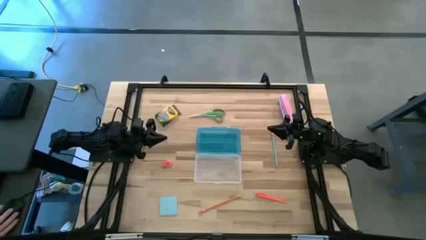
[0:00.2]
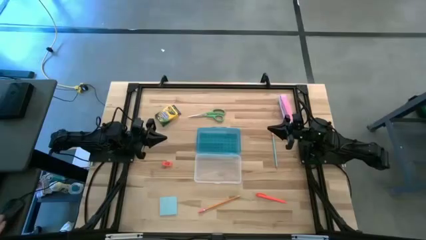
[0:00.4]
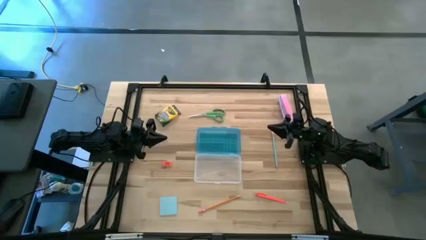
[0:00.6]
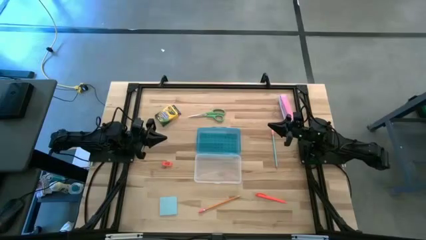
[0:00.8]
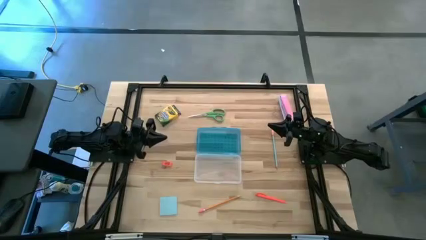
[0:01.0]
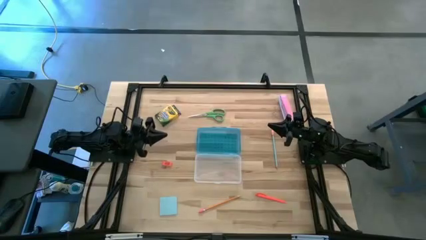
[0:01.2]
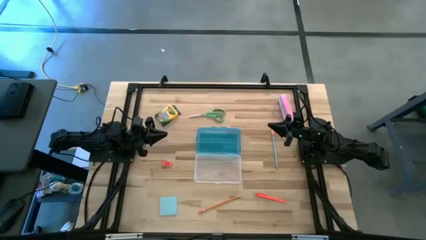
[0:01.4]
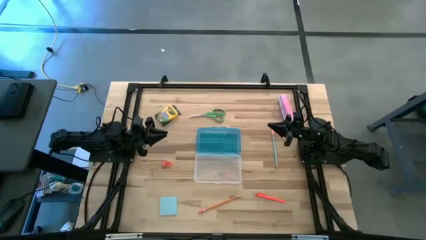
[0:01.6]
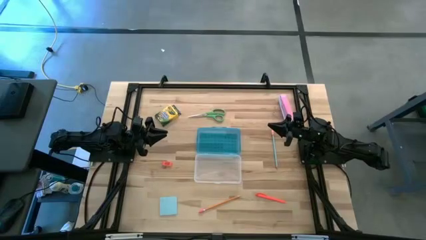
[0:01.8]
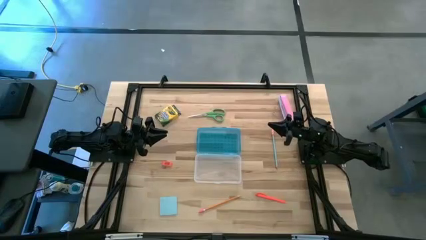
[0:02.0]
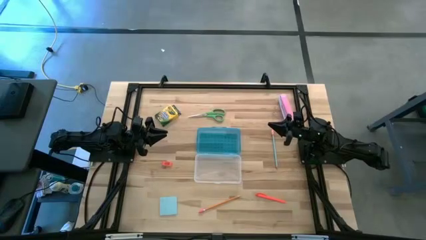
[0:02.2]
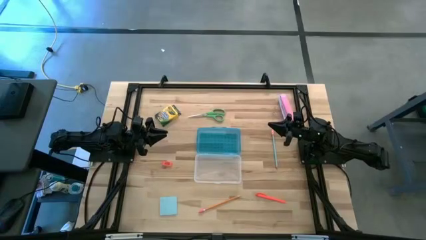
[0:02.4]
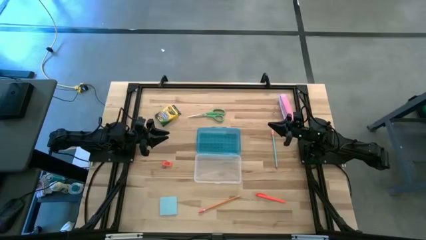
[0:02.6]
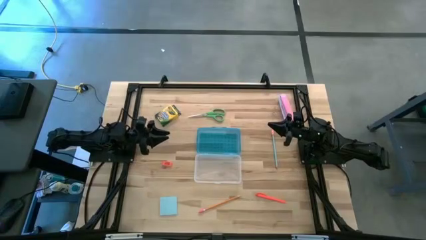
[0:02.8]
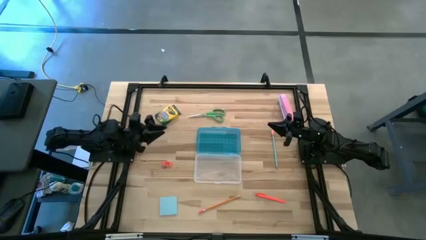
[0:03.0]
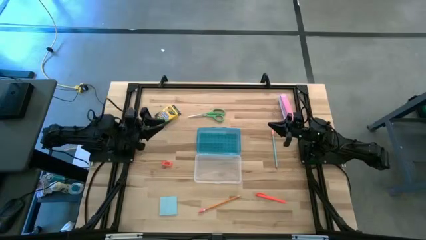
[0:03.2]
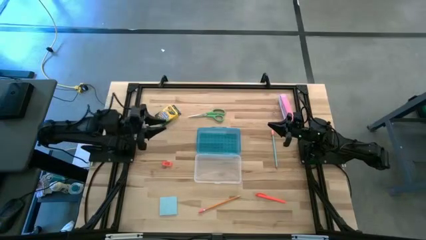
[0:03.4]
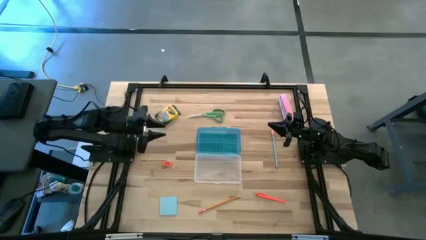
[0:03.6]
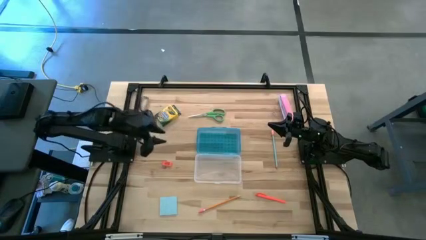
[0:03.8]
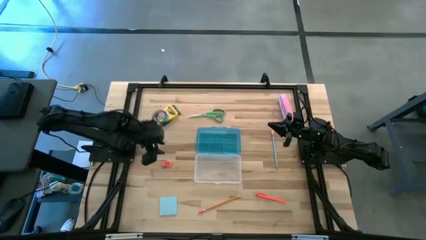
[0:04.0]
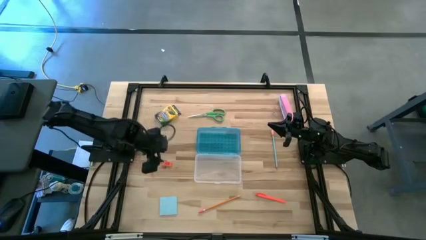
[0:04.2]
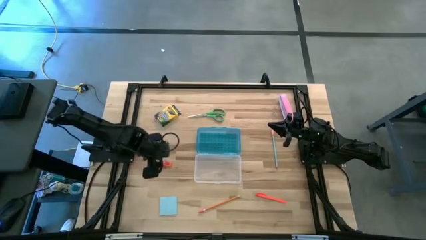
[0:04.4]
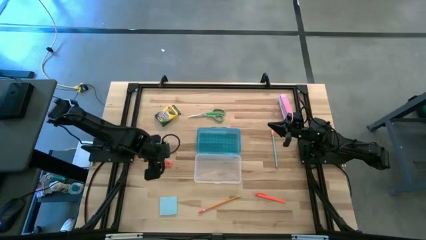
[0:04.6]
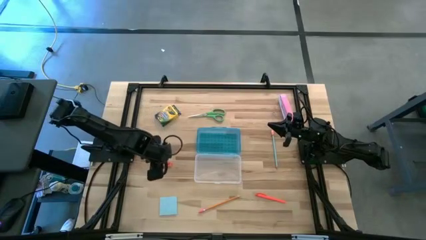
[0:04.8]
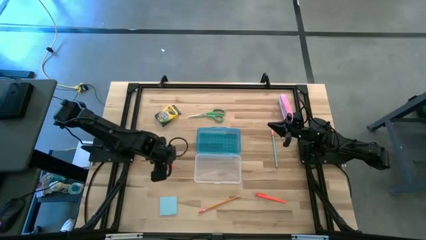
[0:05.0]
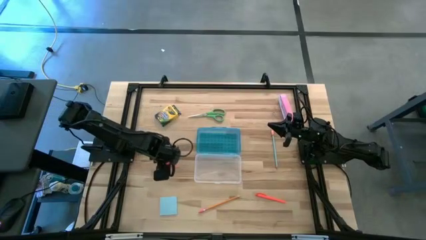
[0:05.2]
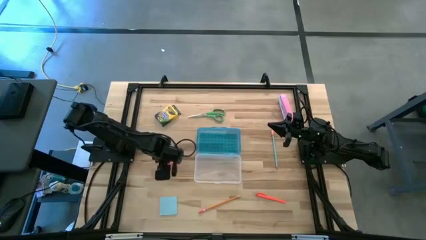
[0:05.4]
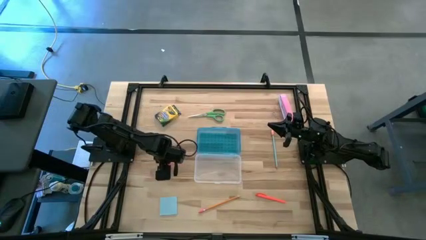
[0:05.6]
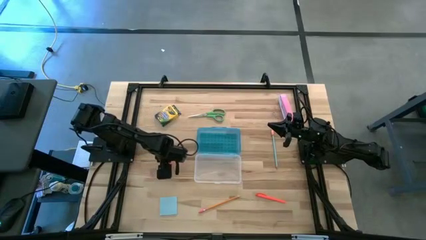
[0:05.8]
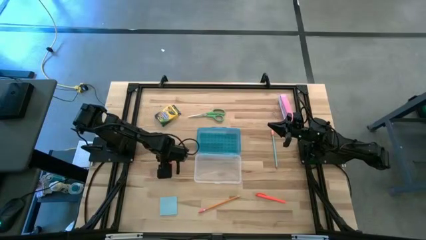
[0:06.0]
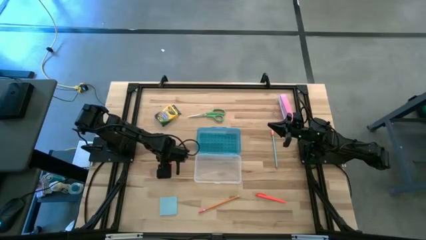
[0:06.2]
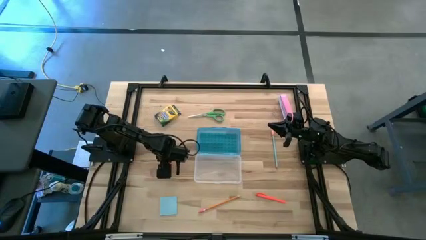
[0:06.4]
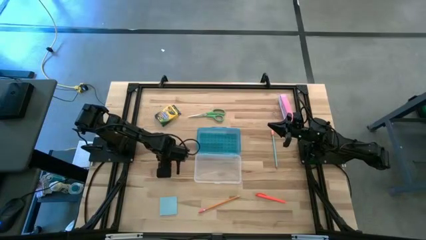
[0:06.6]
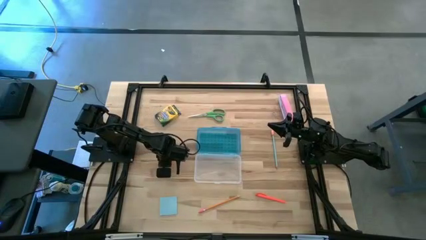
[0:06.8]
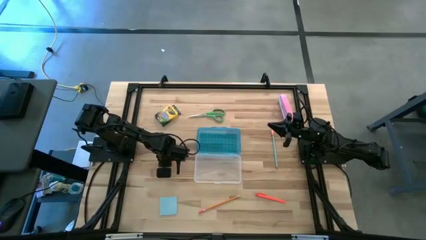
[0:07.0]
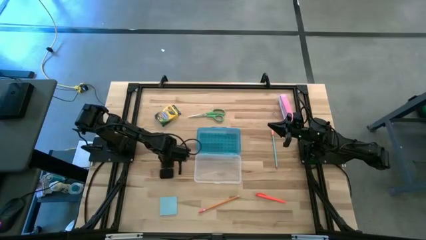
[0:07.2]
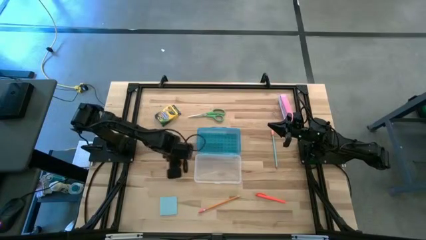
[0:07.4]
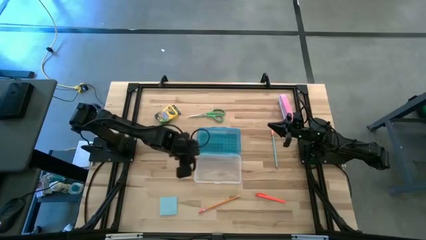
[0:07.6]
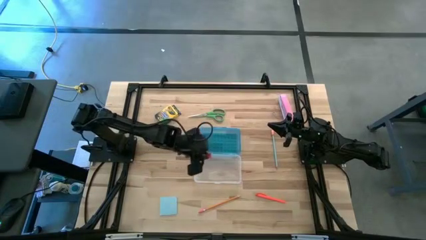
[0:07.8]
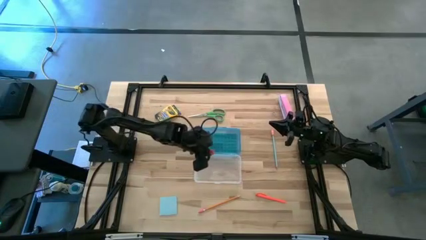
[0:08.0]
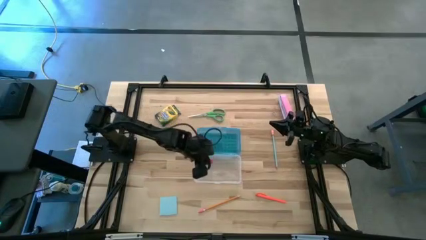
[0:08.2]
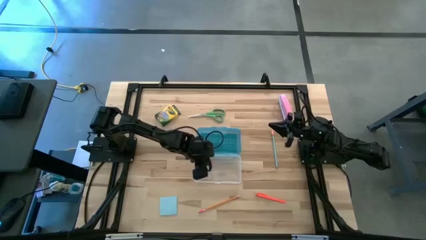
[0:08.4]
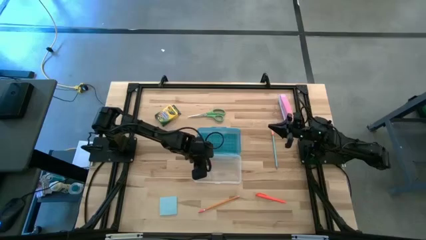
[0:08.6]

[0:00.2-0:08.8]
Task: Pack school essentials
Put the orange eraser into the blue supply box

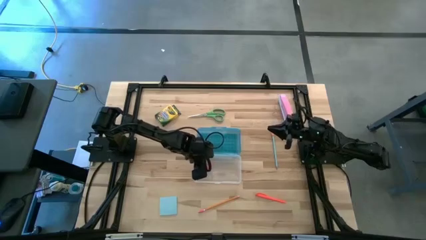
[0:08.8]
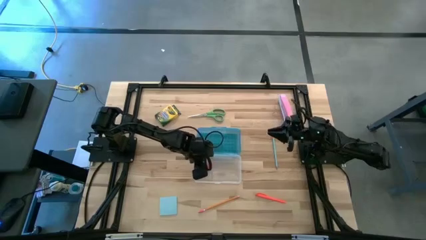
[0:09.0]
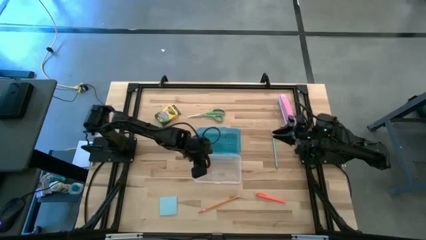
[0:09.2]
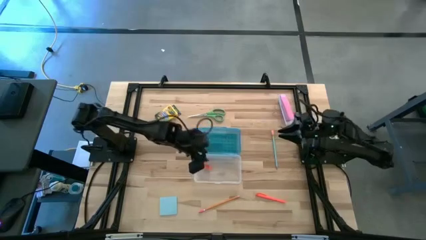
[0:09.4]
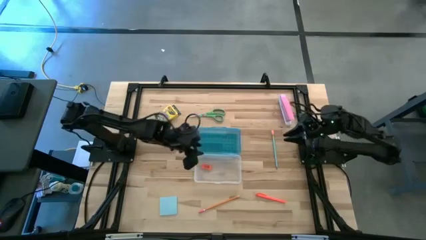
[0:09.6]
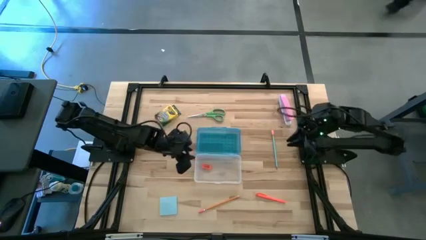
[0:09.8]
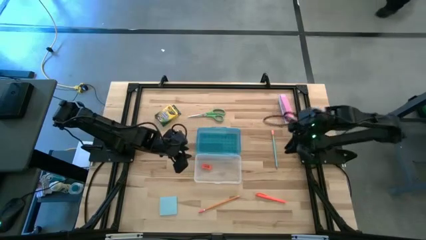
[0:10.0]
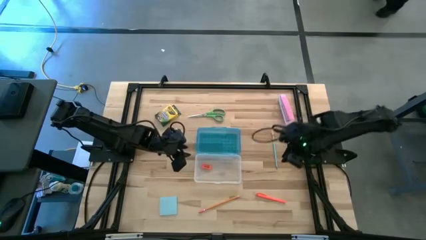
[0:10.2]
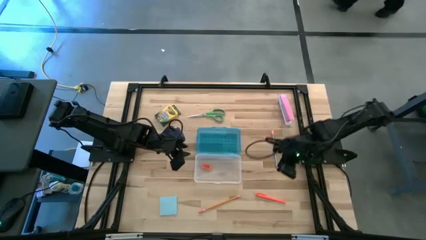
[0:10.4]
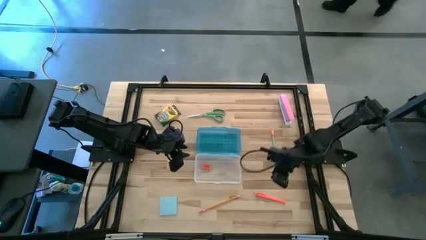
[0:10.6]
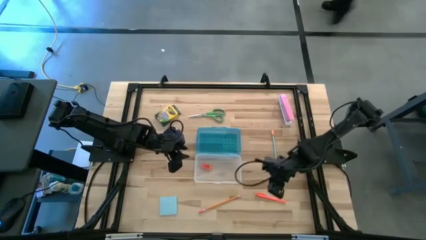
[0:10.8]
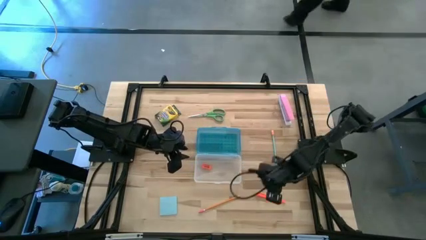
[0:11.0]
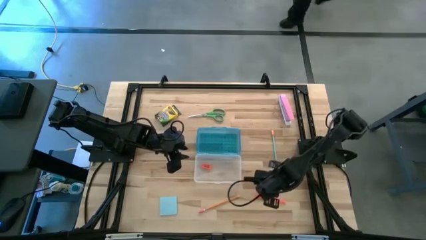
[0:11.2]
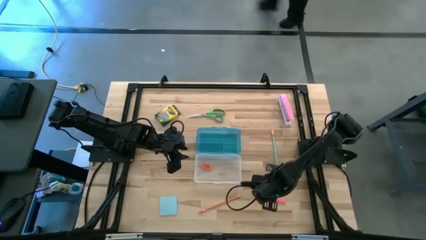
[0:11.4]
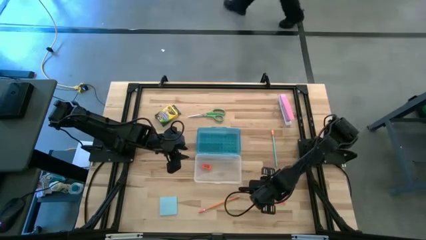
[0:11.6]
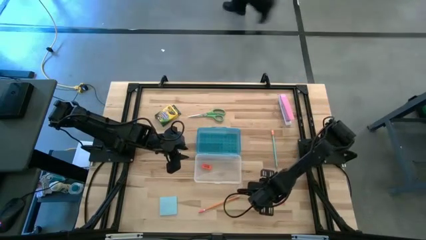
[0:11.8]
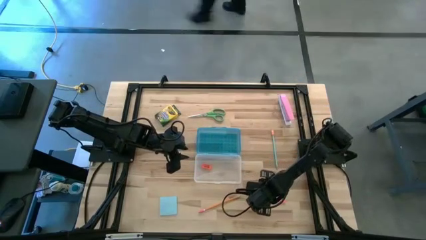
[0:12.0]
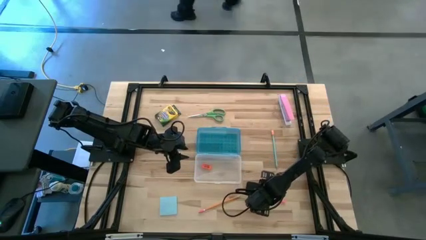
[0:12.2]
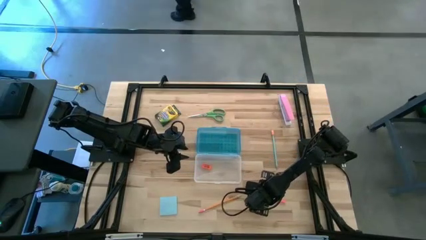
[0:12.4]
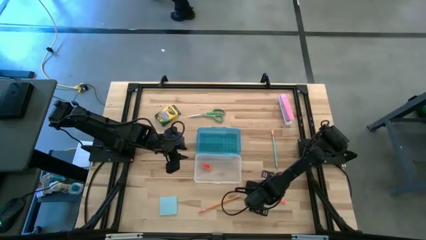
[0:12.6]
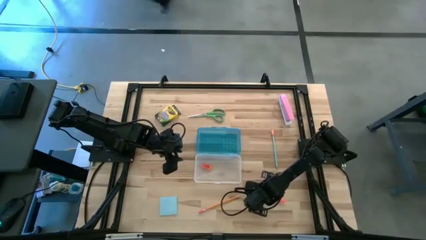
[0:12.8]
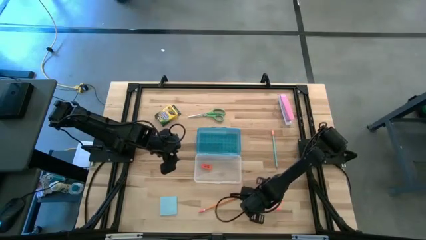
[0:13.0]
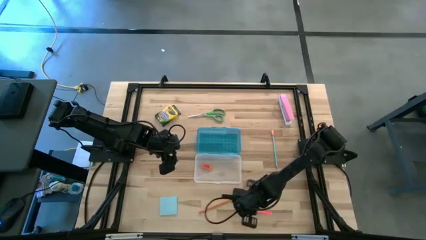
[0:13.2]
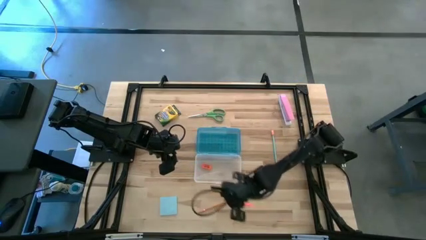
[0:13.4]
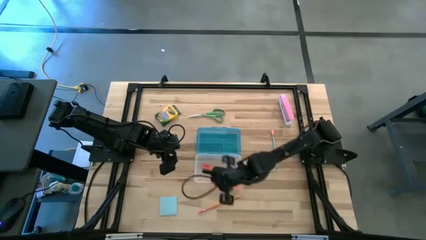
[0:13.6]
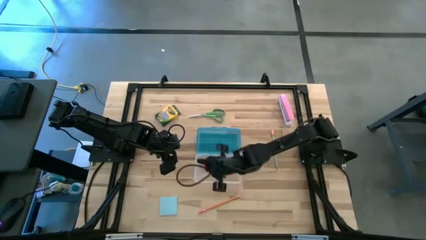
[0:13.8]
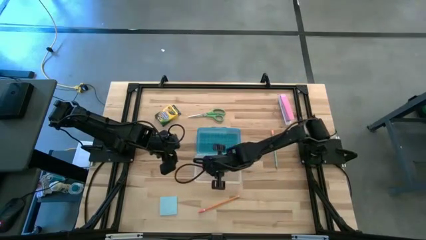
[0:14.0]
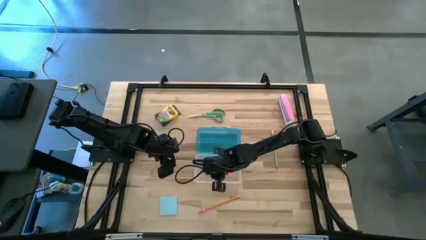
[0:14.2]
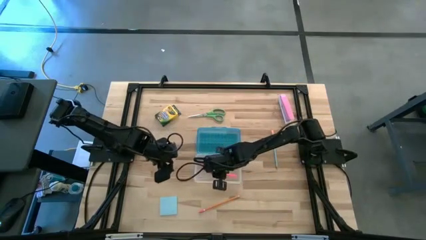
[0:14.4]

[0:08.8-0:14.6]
Put the orange pen into the blue supply box
